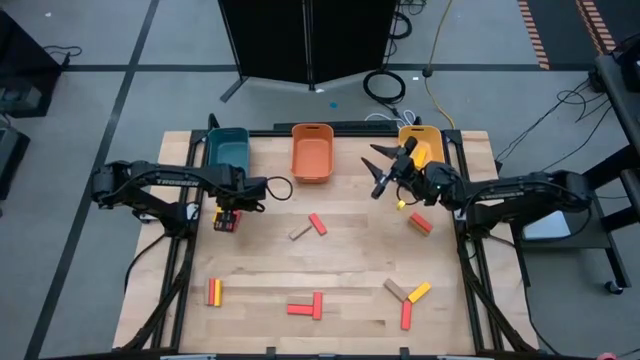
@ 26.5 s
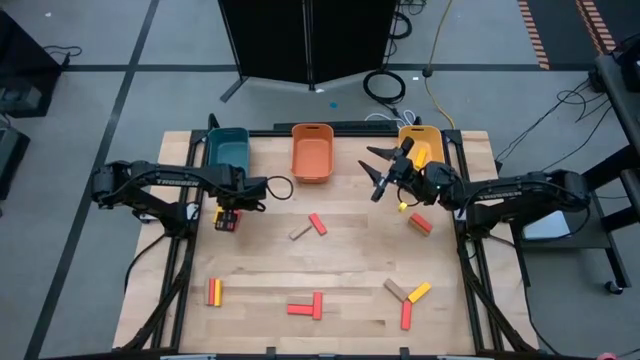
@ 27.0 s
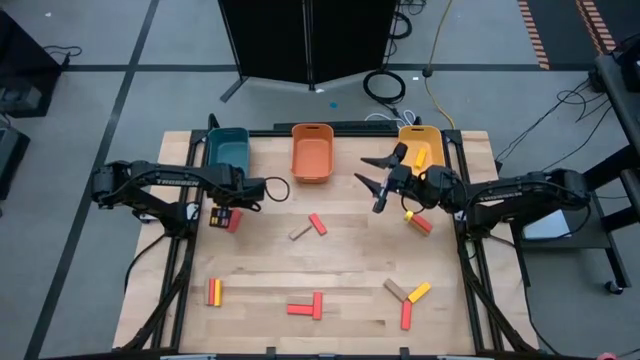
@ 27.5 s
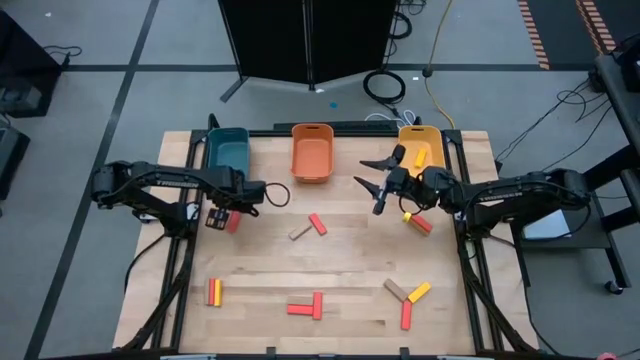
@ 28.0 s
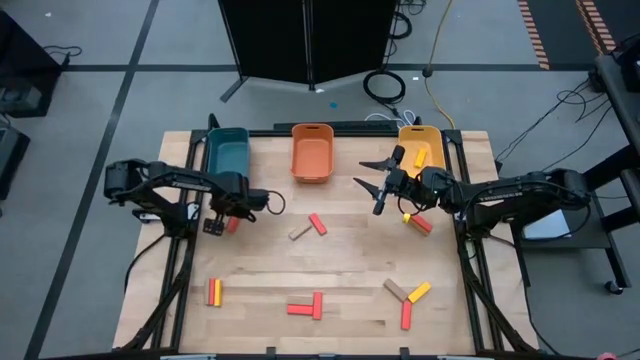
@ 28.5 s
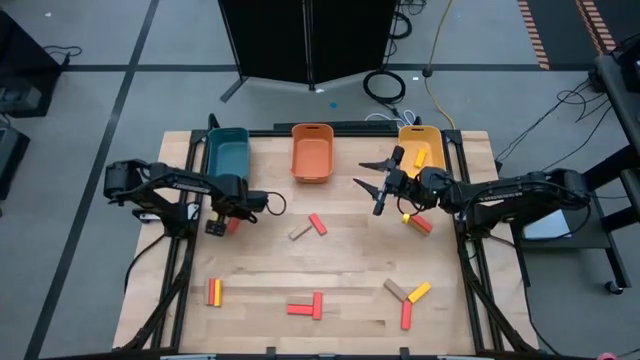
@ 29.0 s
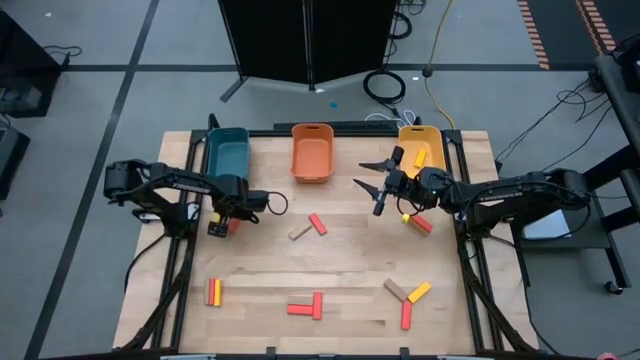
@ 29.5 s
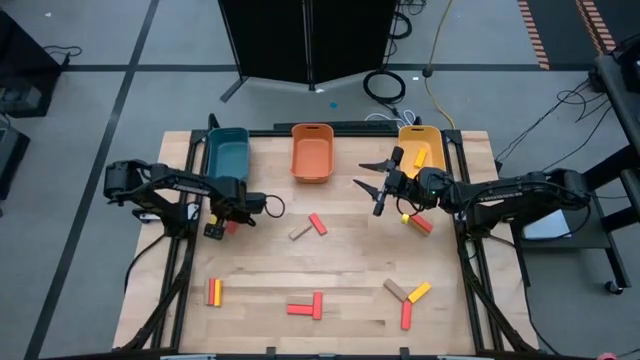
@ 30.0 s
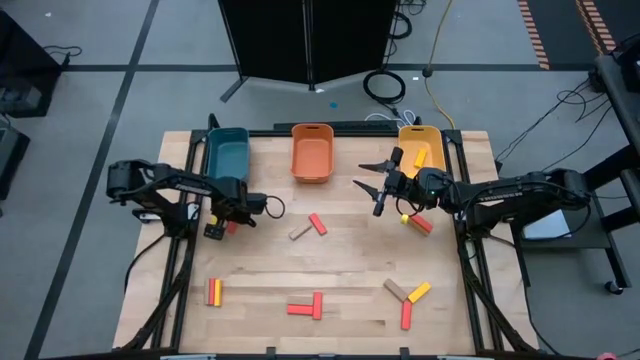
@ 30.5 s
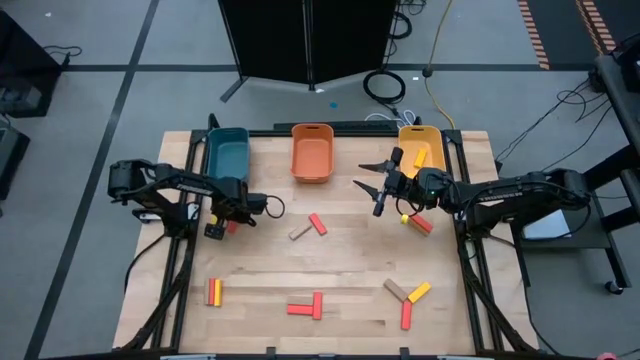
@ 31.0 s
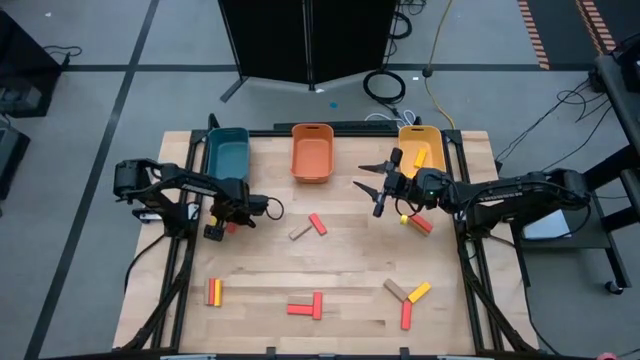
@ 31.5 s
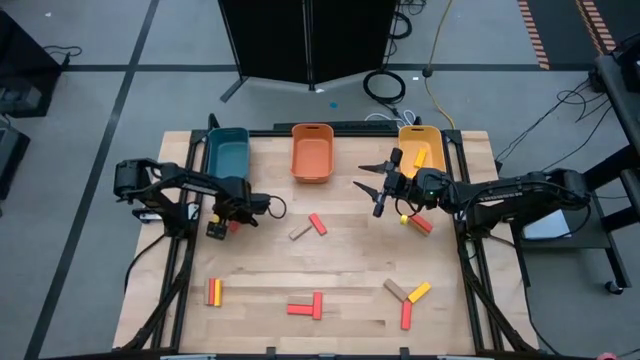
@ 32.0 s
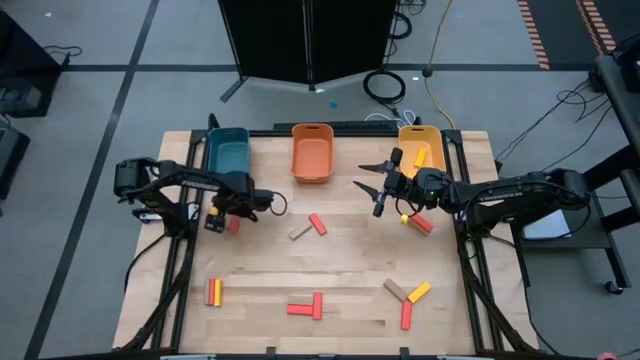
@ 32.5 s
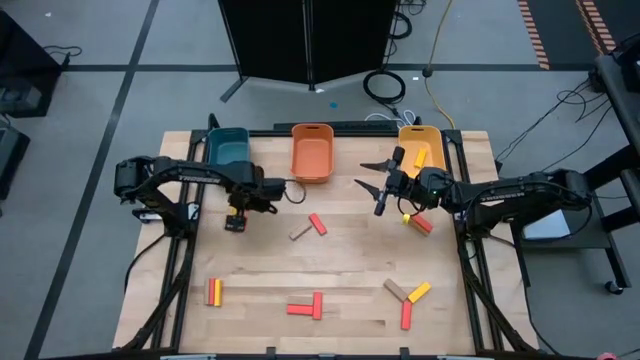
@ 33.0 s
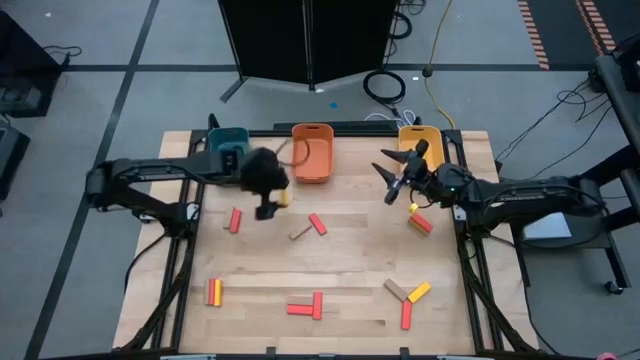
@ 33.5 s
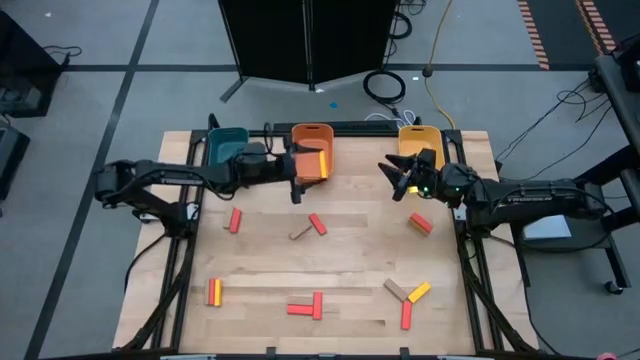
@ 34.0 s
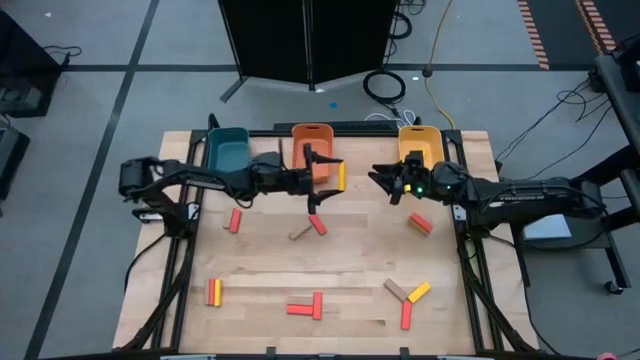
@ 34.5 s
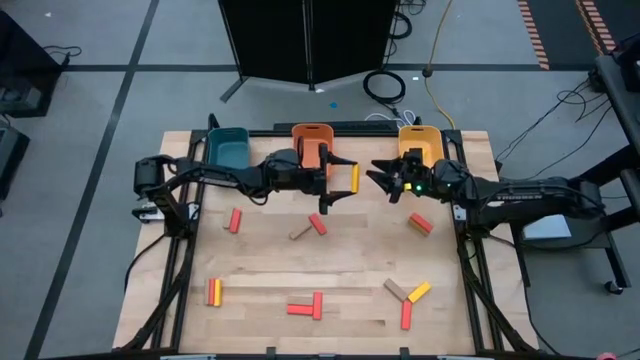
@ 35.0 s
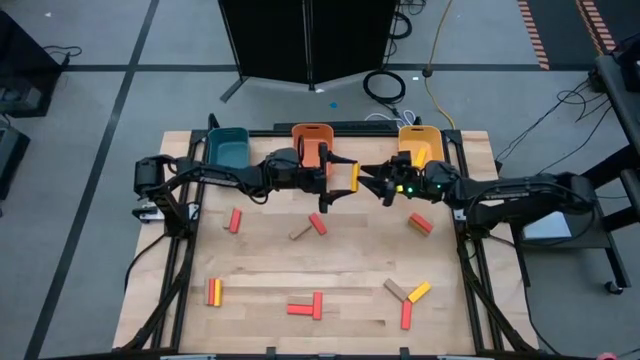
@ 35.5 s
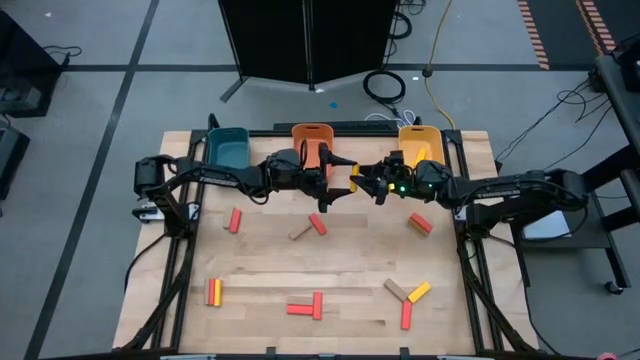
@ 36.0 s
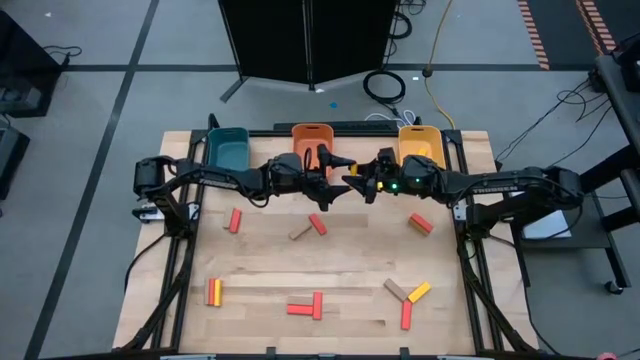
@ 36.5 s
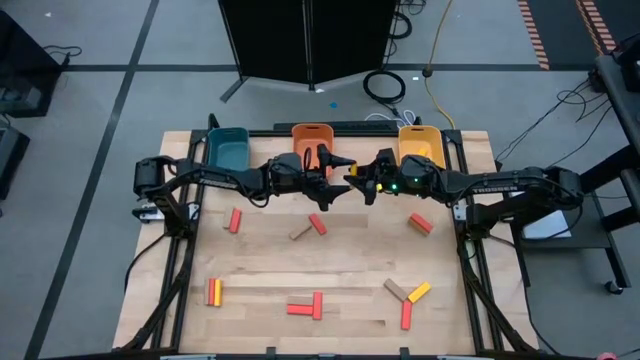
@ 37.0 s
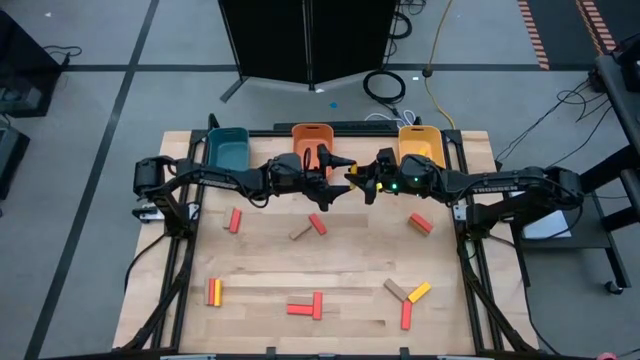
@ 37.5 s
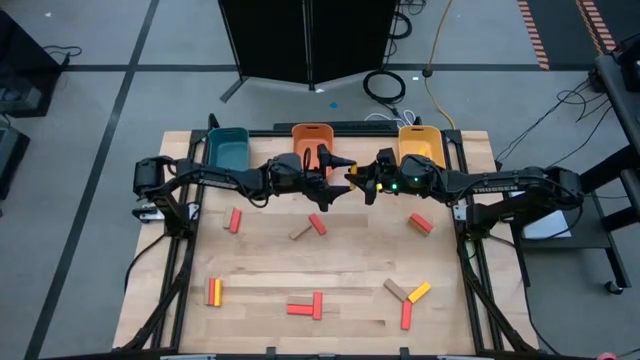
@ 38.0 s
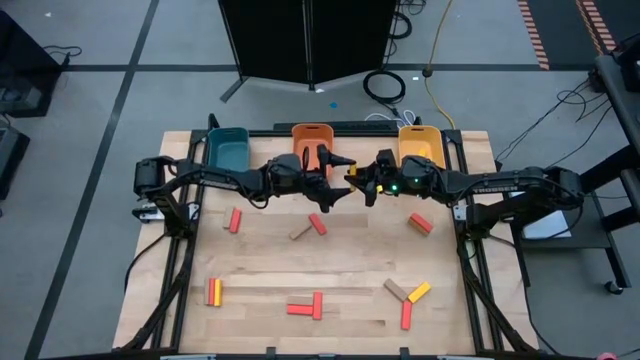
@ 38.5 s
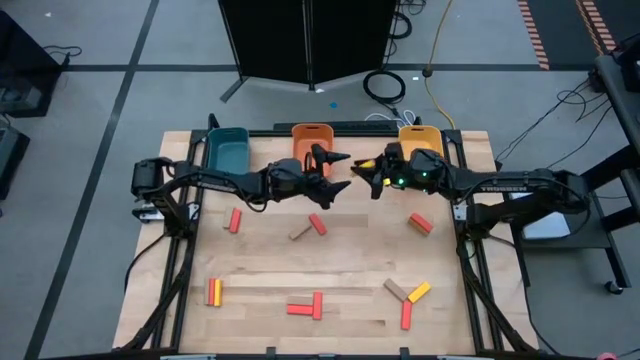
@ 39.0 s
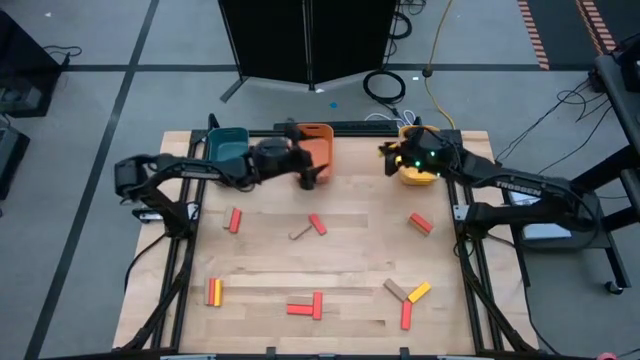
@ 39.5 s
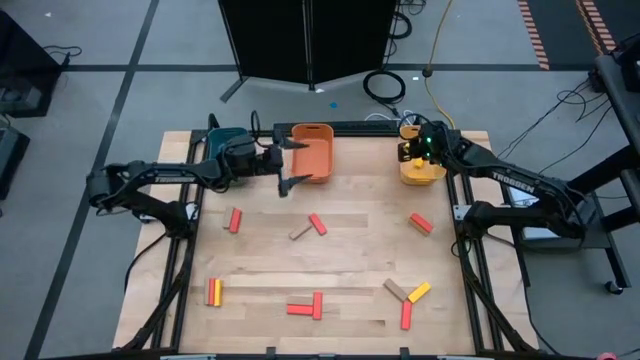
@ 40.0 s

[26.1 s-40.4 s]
Task: Sort blocks
Put the yellow block into the yellow bin

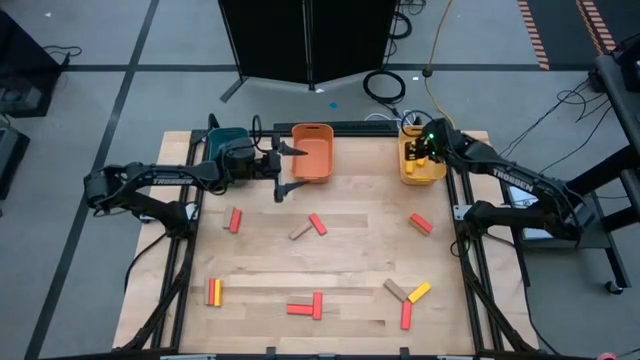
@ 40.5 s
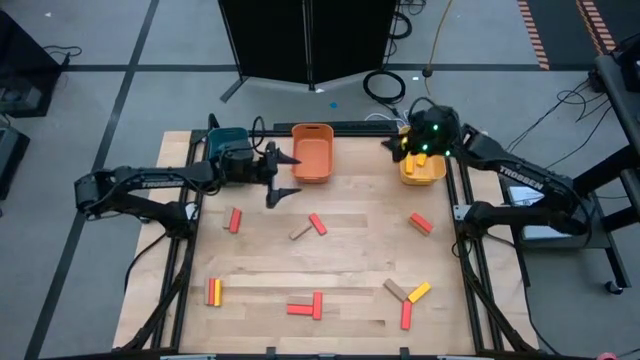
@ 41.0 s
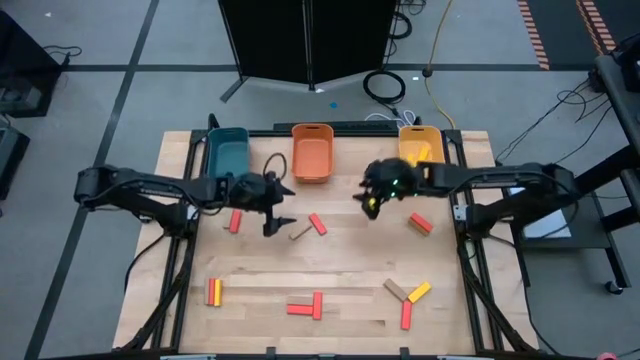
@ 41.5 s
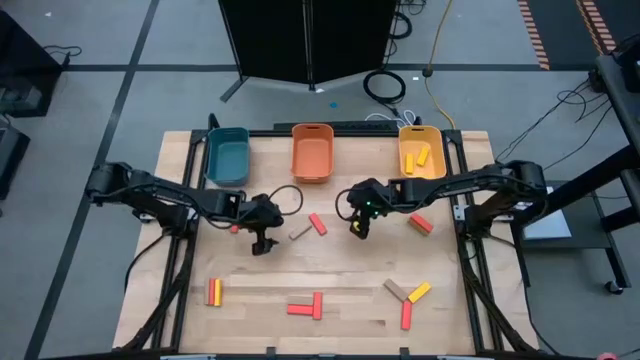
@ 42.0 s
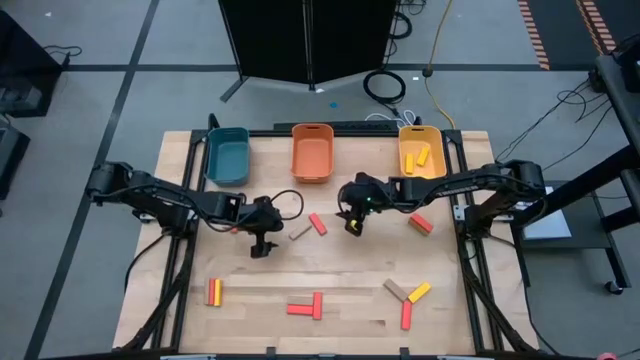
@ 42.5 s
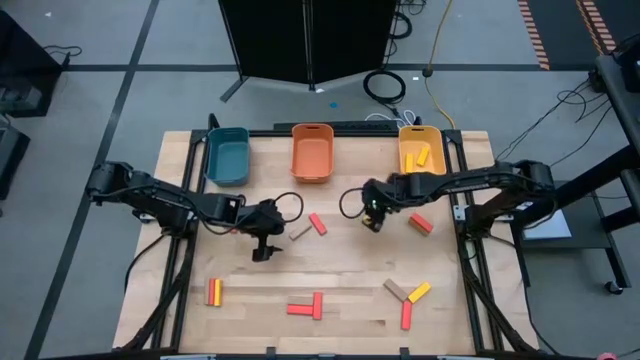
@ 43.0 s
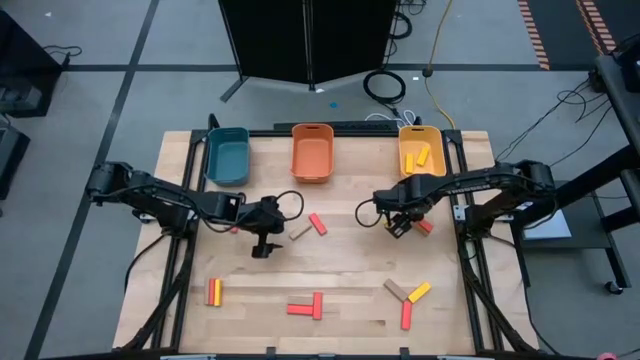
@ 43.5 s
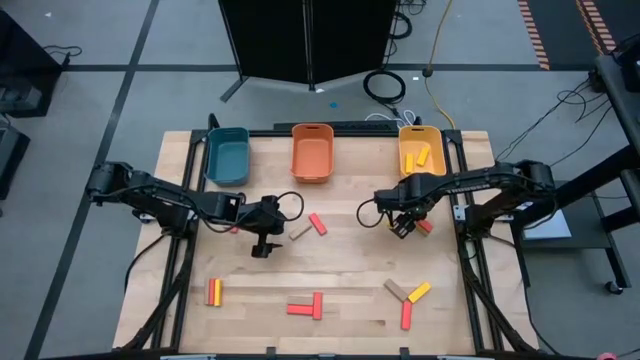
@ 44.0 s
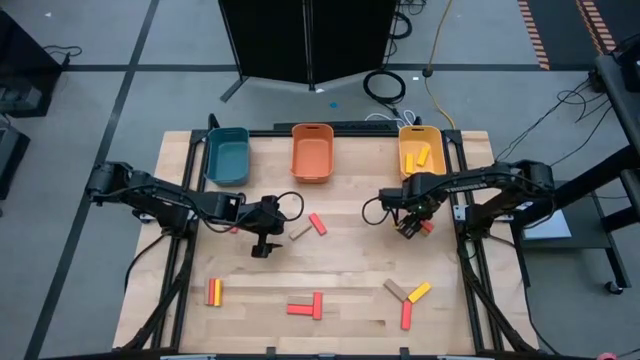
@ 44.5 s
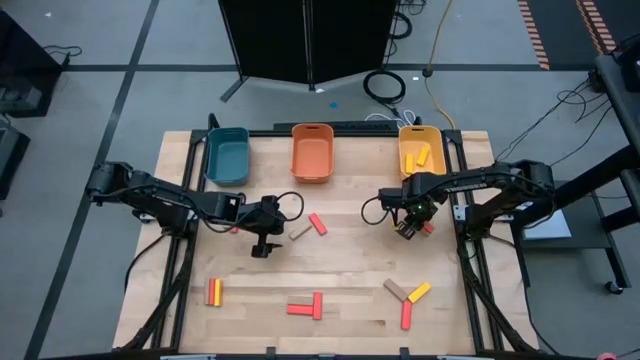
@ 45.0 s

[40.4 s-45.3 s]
Put the red block into the orange bin

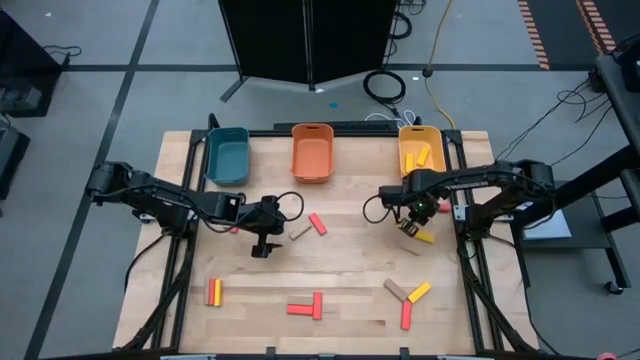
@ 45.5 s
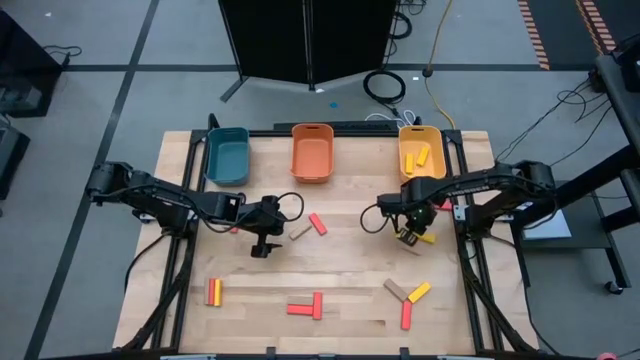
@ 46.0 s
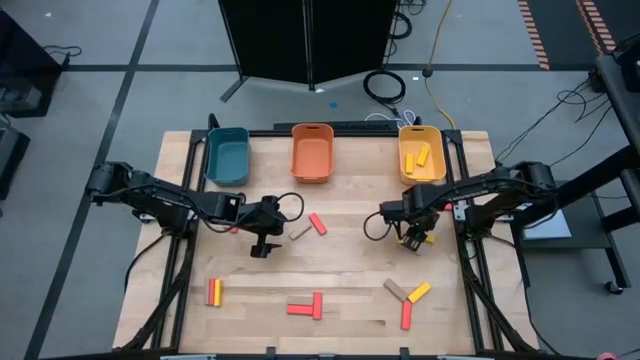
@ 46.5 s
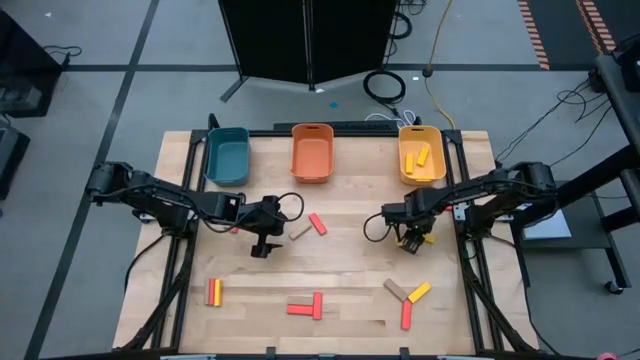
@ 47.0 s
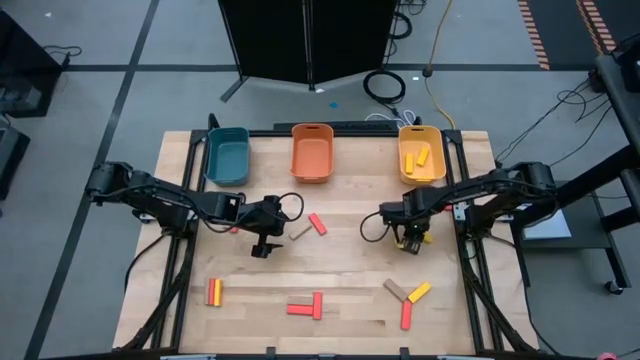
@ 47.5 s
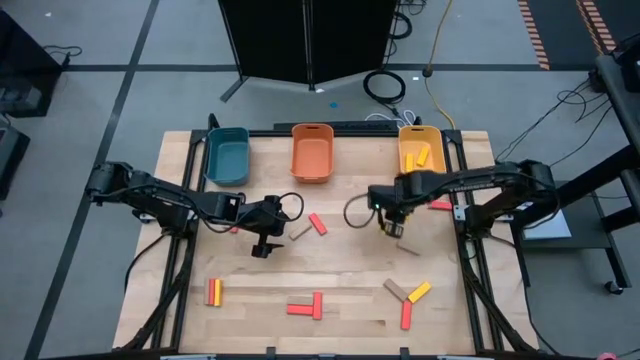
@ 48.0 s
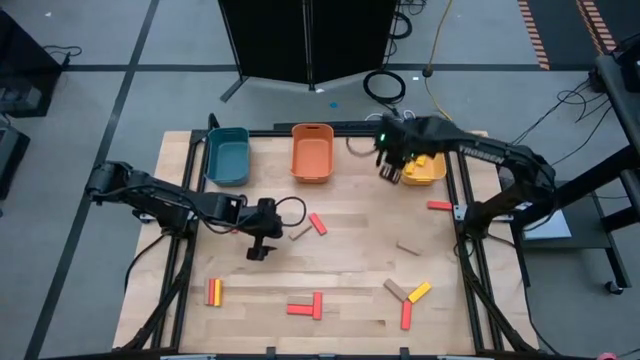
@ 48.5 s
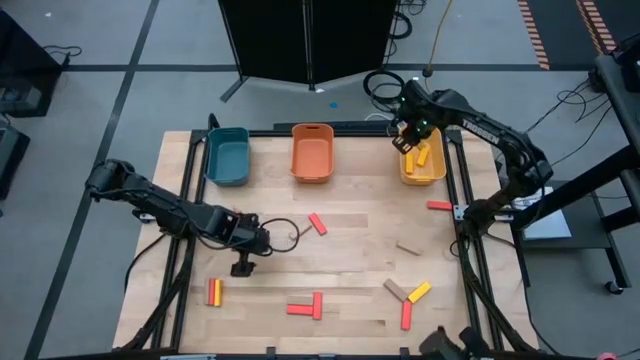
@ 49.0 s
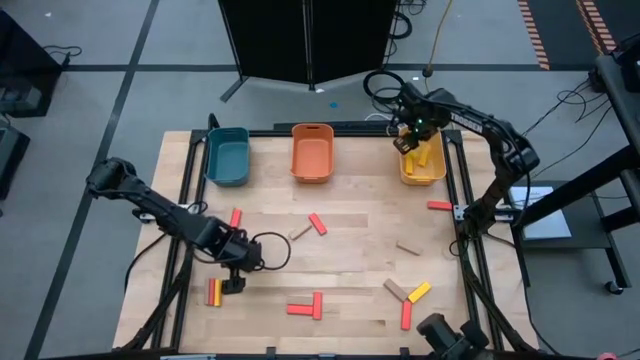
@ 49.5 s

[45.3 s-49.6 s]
Put the yellow block into the yellow bin
